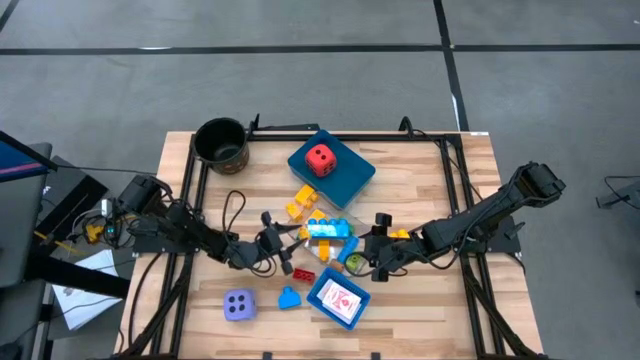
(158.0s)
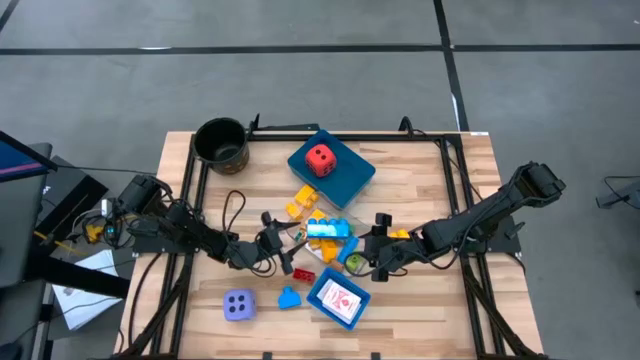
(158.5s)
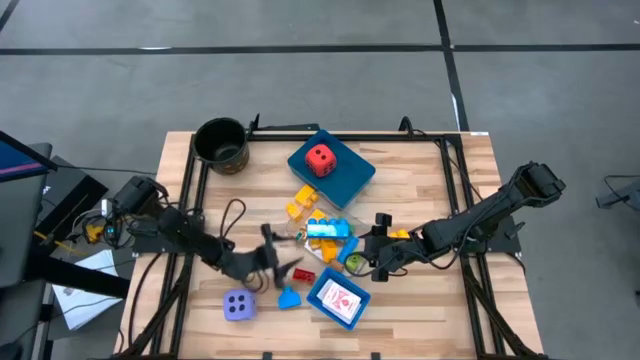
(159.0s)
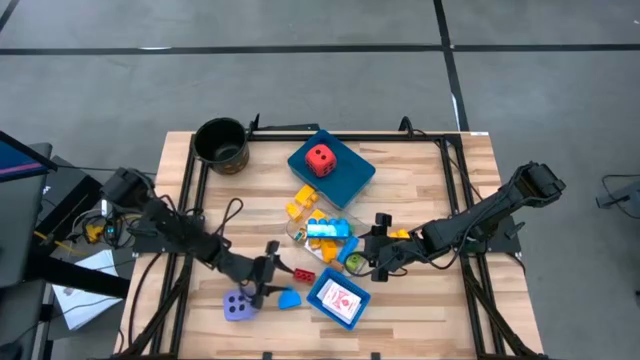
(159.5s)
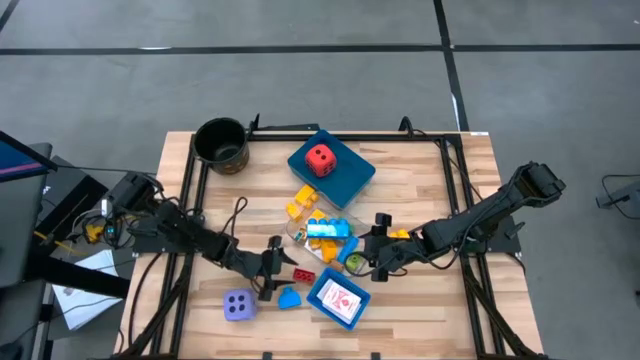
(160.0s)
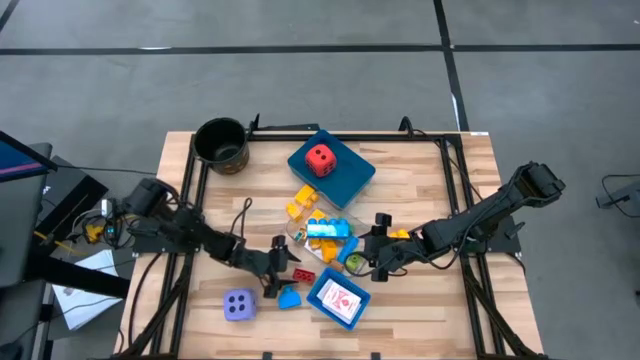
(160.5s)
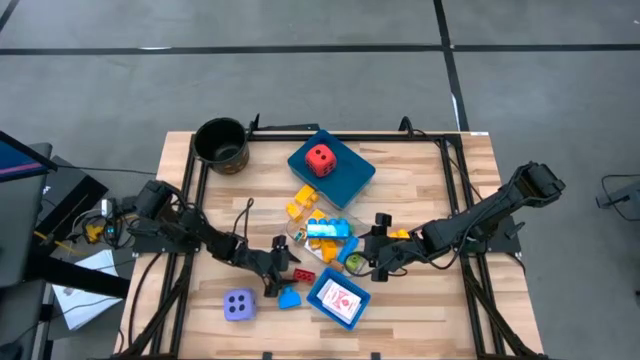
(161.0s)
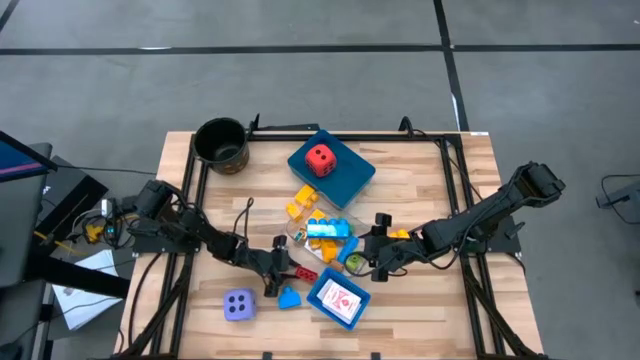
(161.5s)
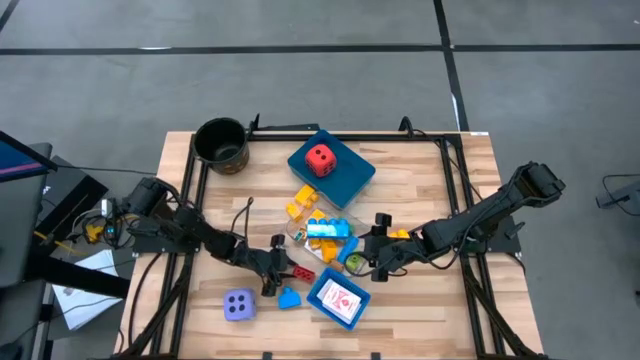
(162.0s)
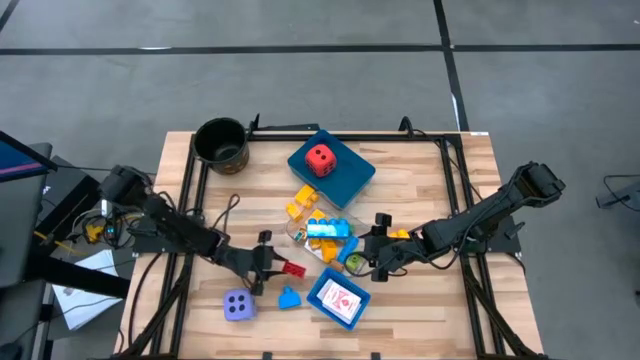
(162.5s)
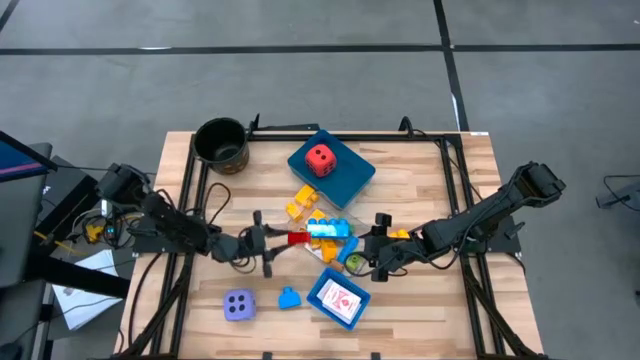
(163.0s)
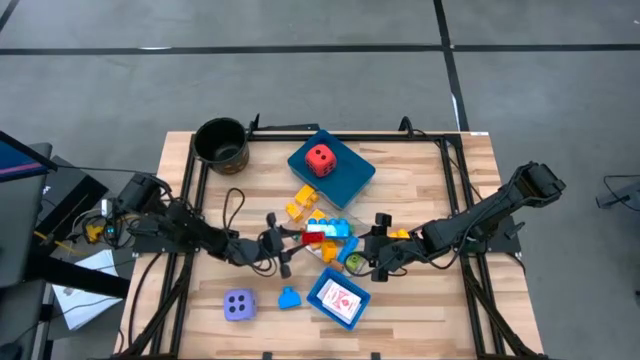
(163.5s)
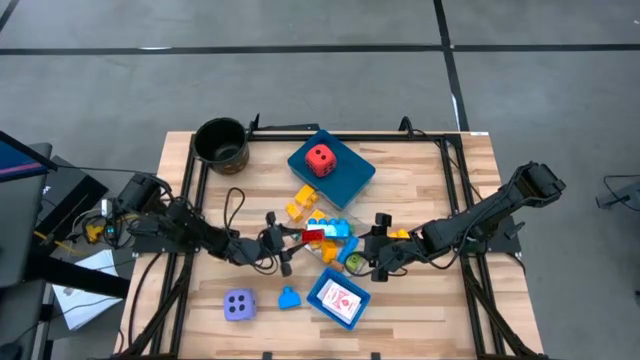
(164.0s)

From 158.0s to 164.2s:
Task: Pick & Place Toys
Put the red game piece block into the transparent bin

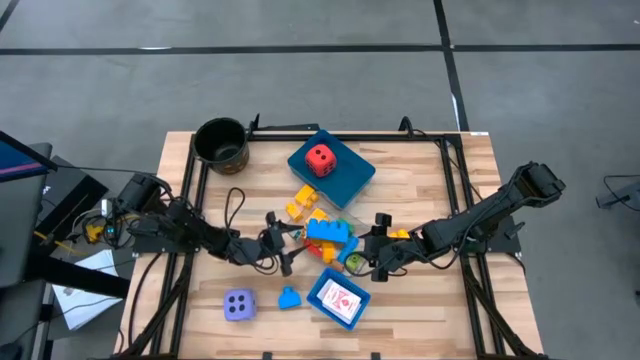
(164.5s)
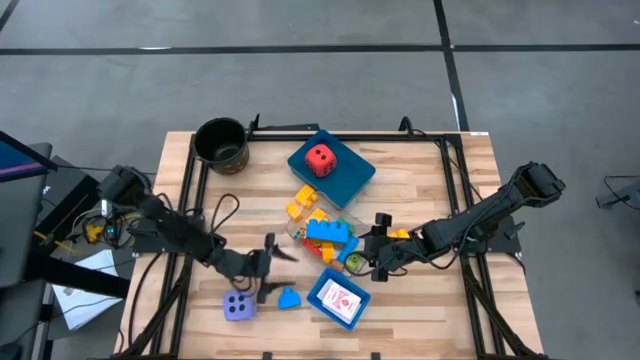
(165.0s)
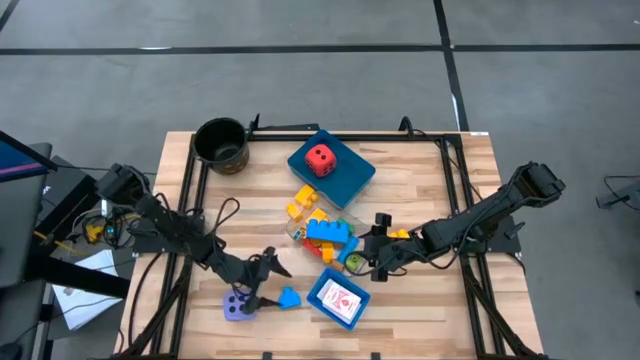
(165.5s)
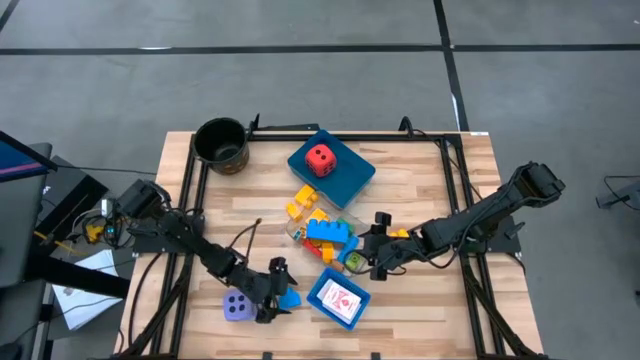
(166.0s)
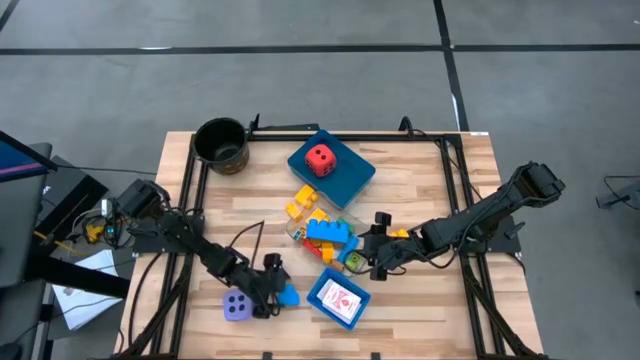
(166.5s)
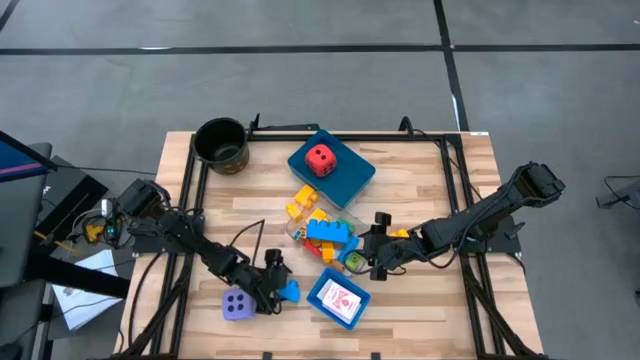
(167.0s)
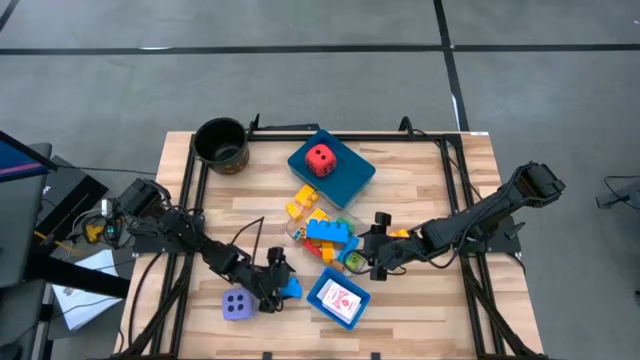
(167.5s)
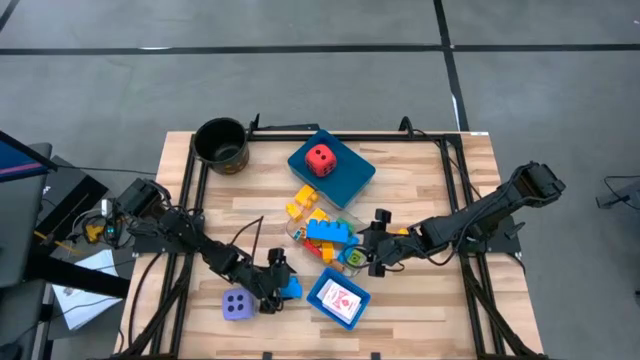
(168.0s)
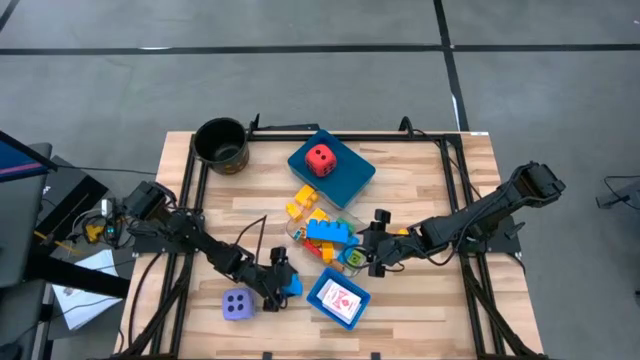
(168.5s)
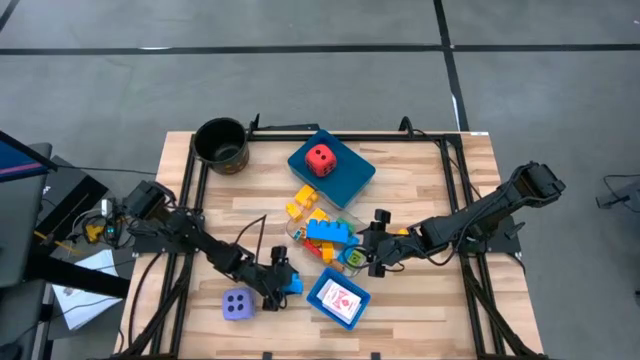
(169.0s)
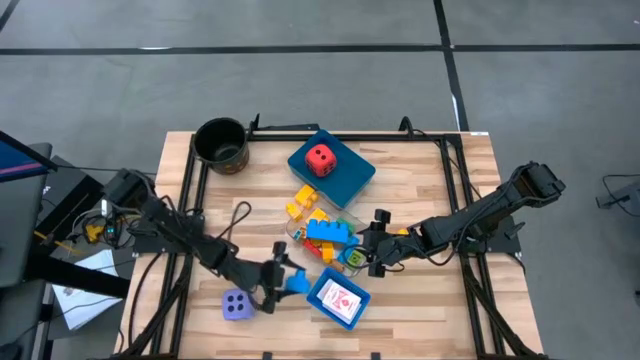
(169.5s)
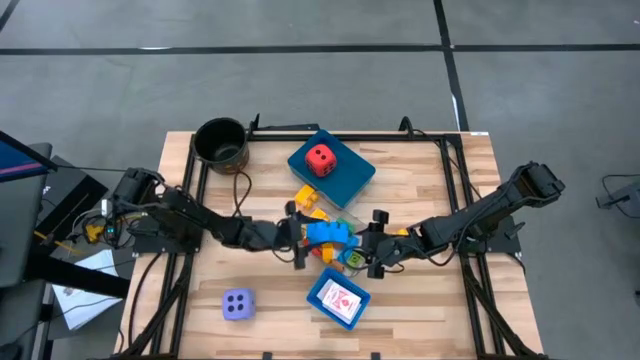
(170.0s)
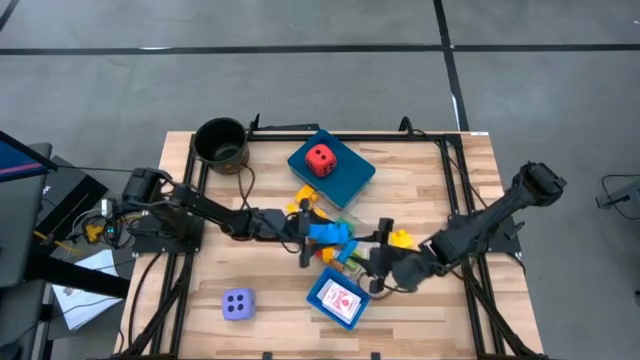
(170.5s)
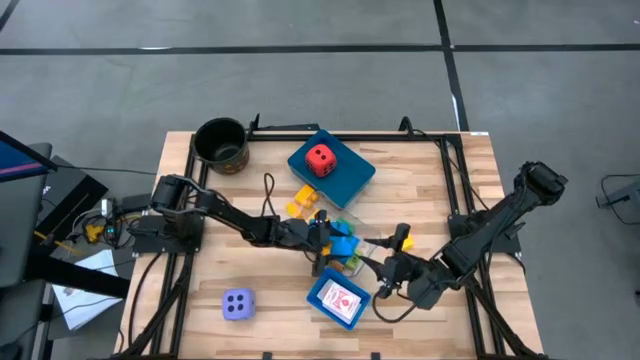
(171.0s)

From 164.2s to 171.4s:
Put the sky blue game piece block into the transparent bin

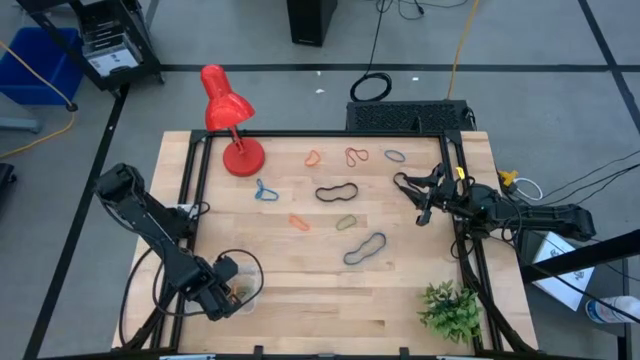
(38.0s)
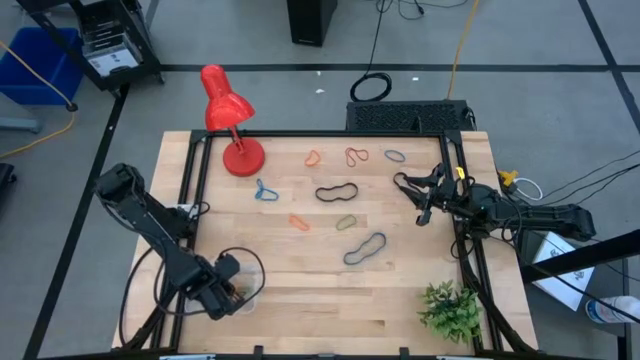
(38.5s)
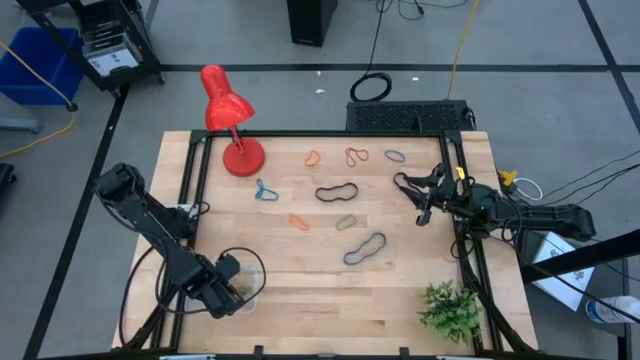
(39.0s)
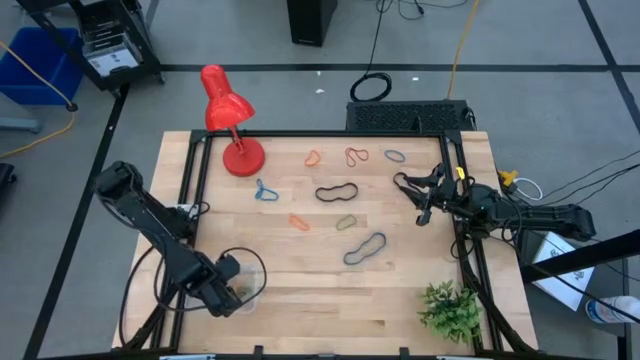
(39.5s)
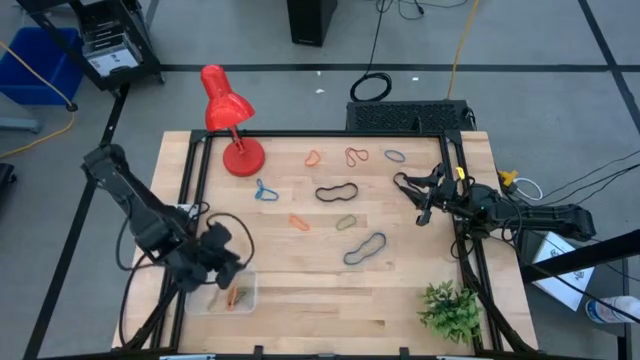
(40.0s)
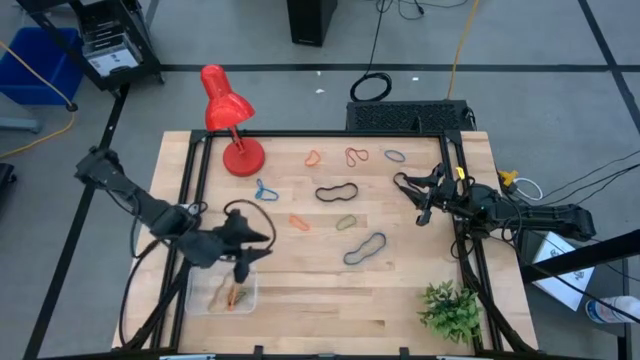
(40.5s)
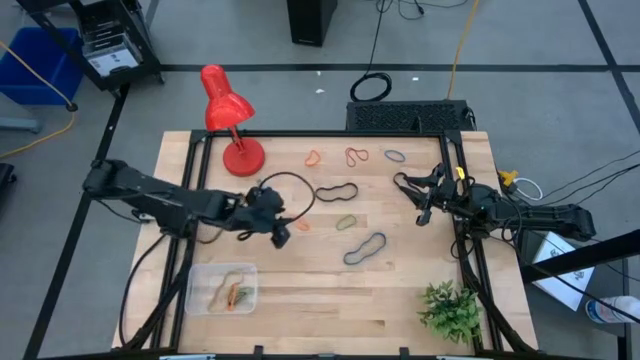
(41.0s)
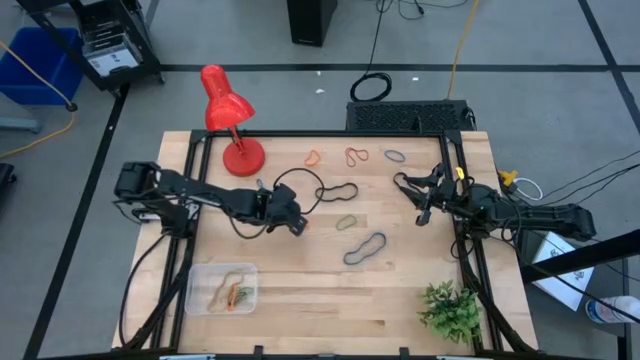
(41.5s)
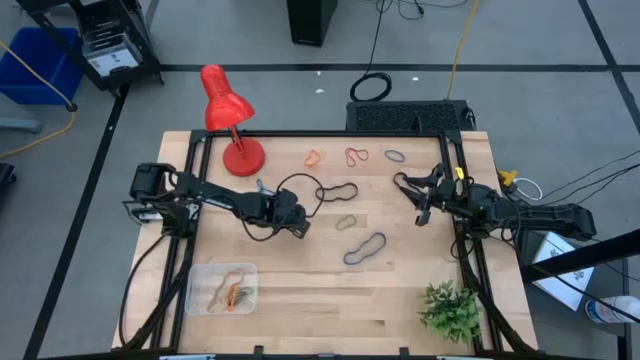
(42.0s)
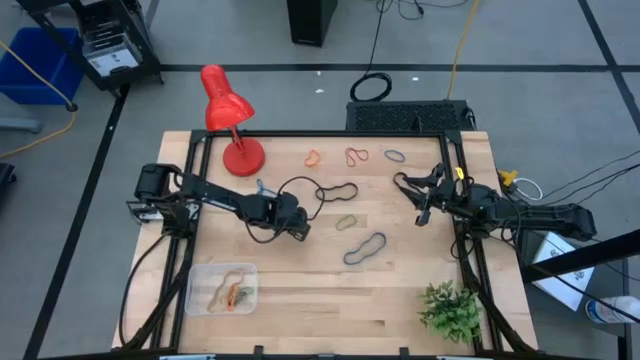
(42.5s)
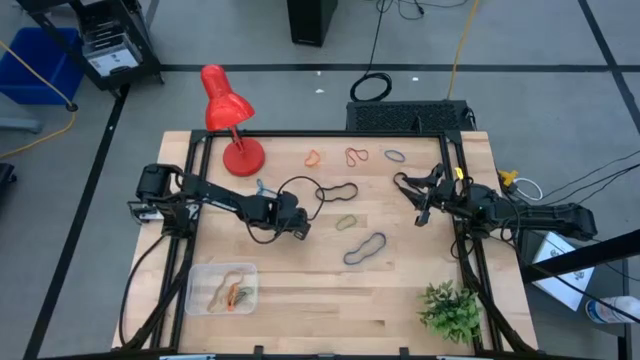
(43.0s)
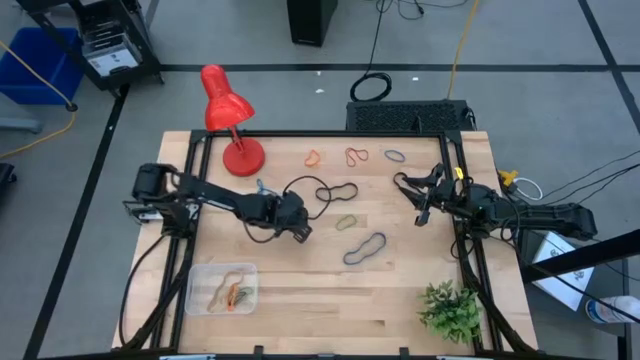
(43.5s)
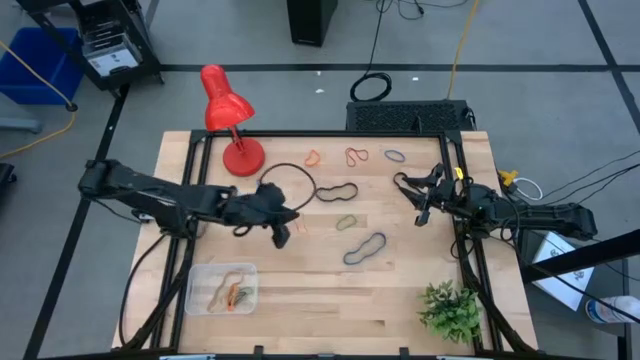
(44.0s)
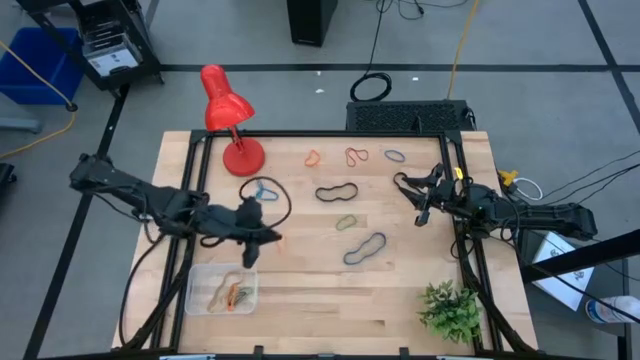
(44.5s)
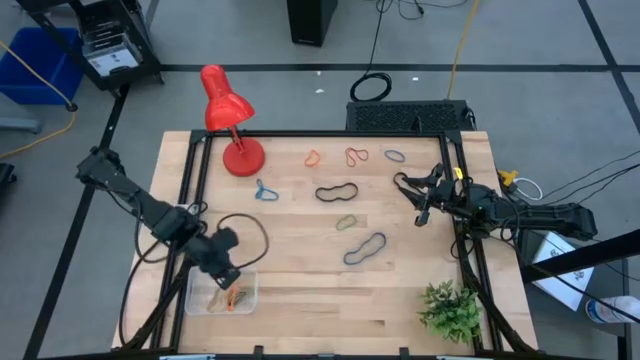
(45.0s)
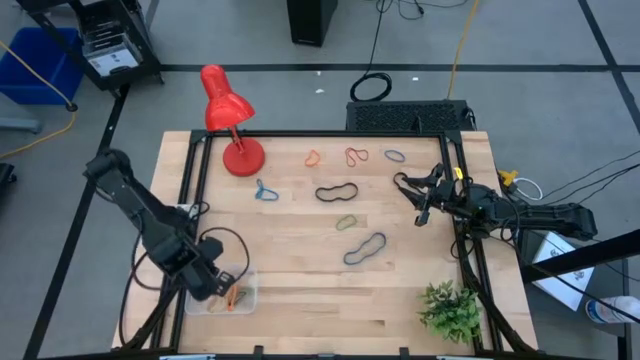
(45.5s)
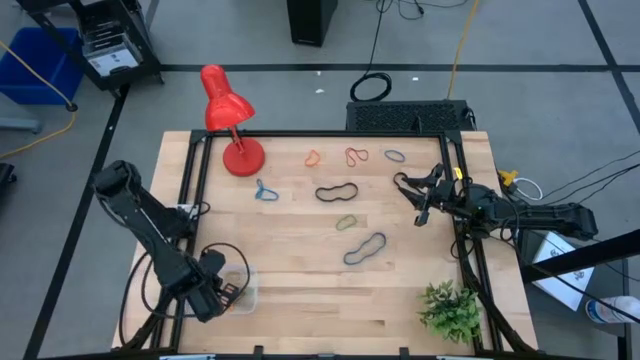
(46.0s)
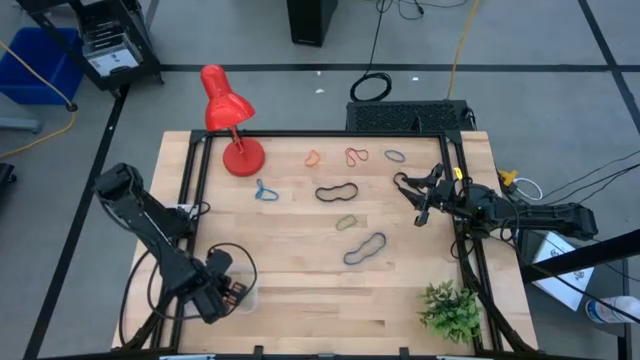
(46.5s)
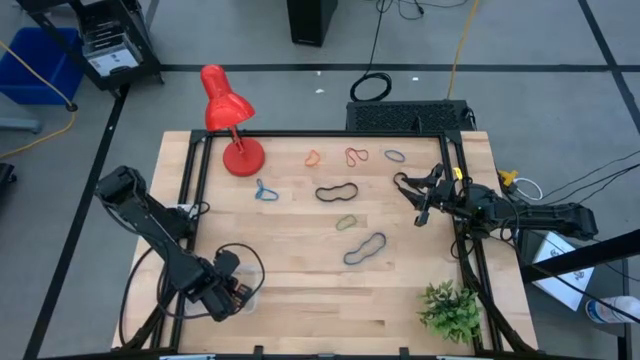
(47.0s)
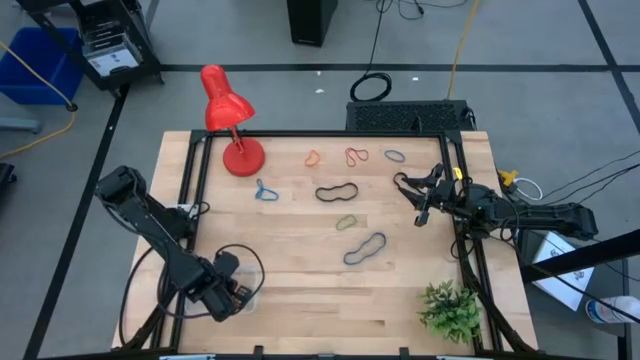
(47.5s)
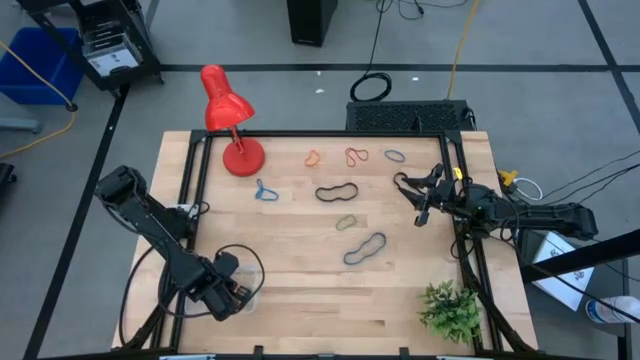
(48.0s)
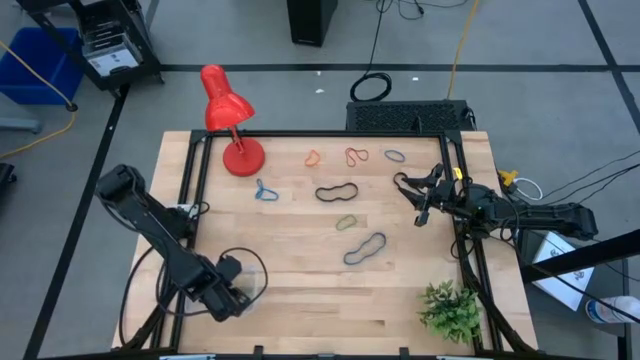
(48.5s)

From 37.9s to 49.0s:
Task: Pick and place rubber bands into bin
Put the bottom orange rubber band into the transparent bin
